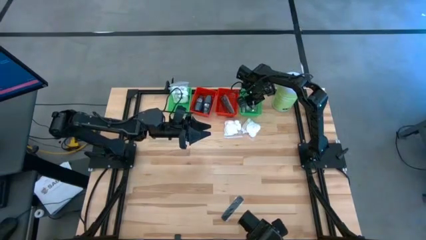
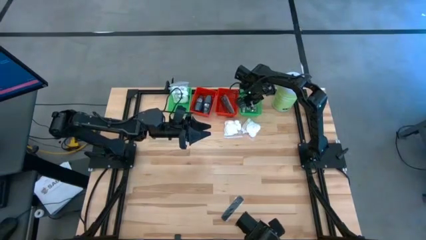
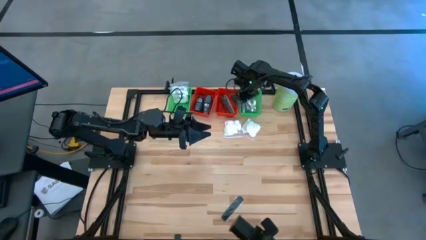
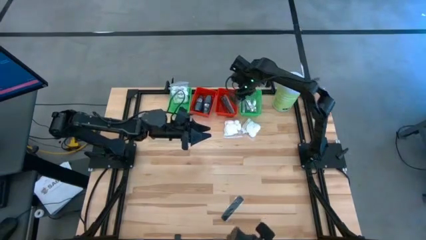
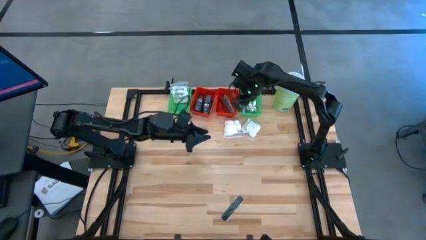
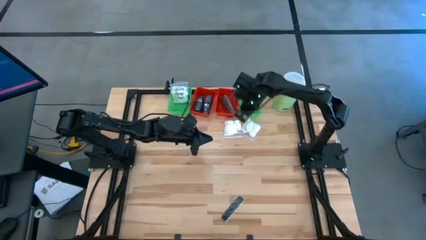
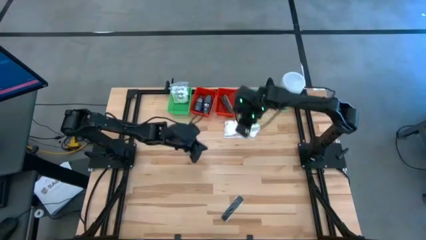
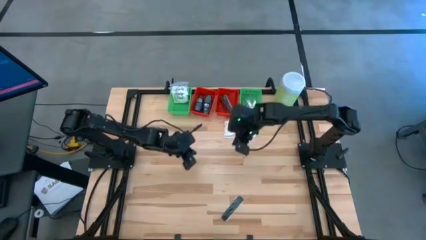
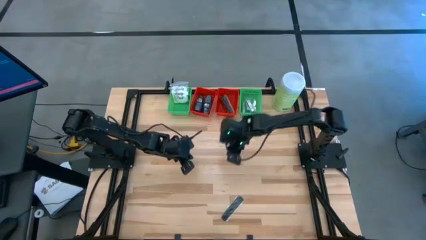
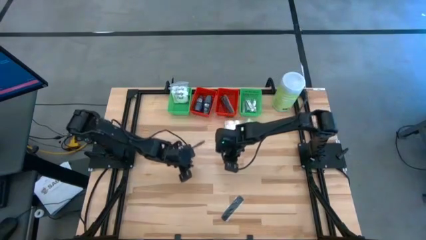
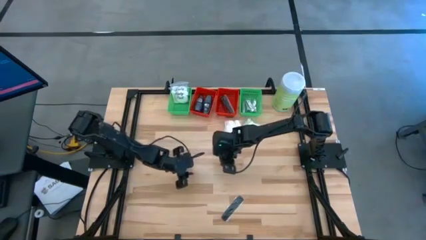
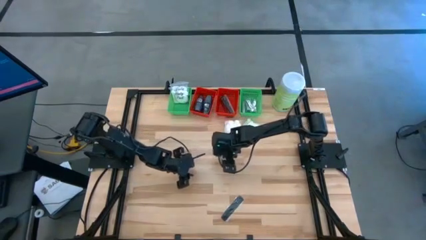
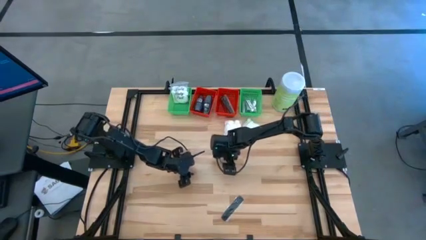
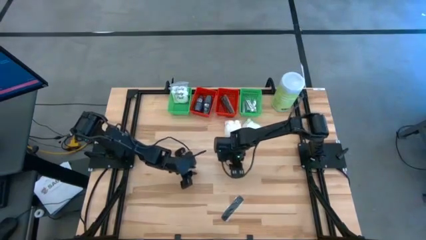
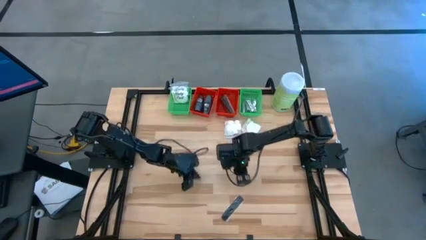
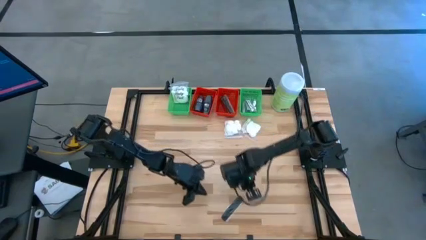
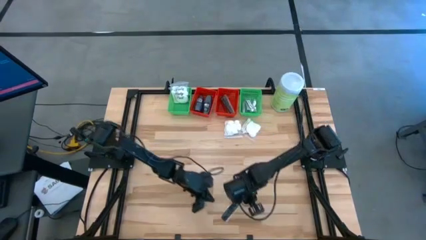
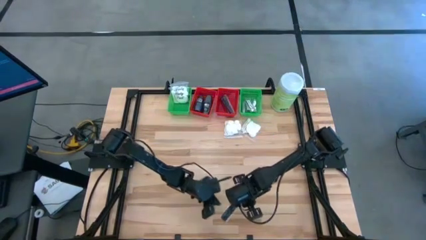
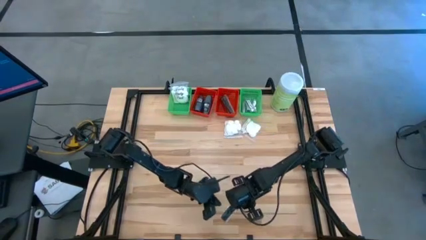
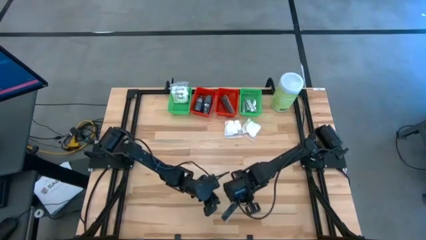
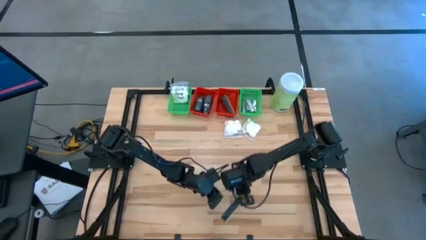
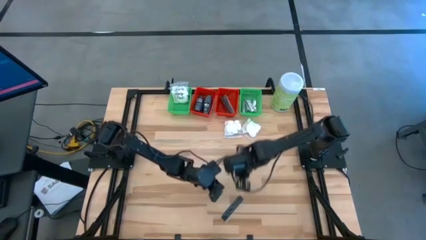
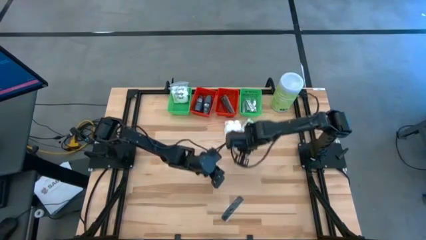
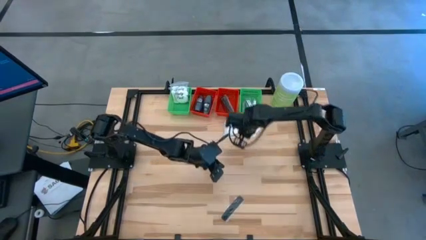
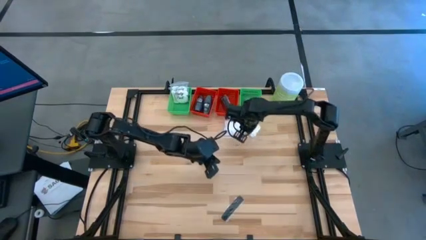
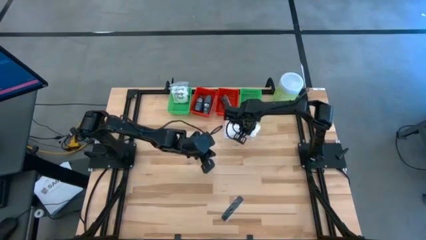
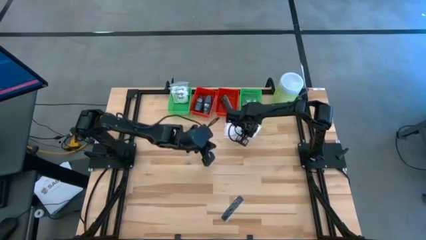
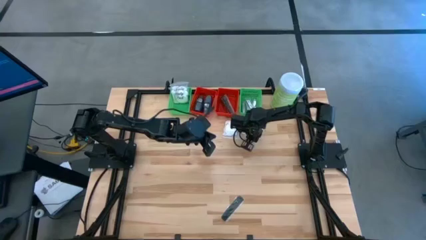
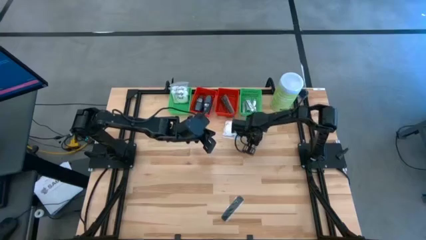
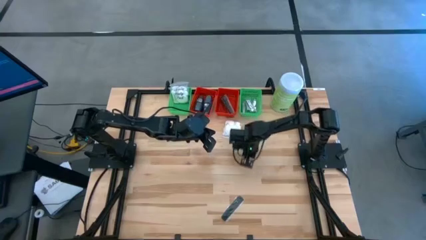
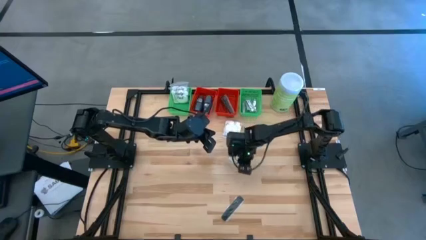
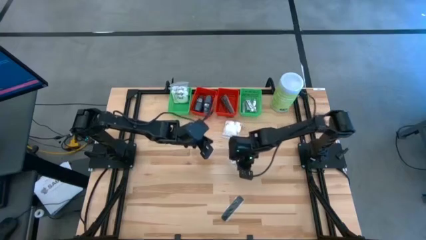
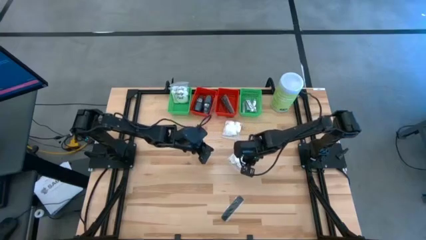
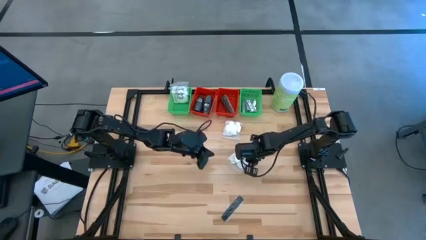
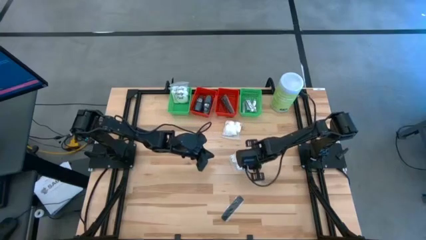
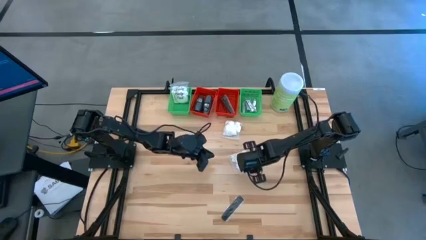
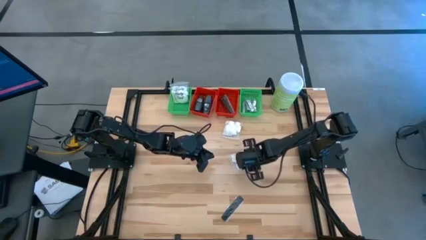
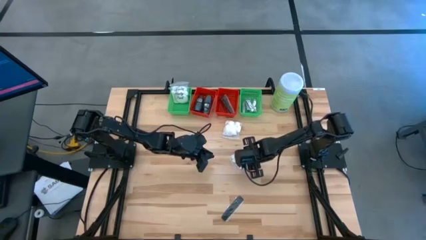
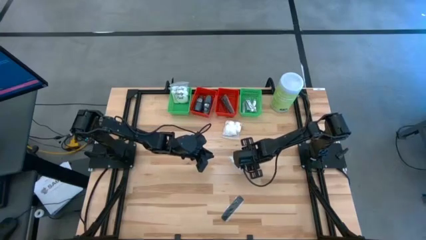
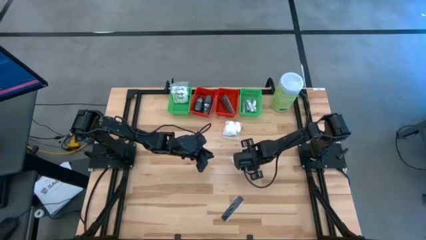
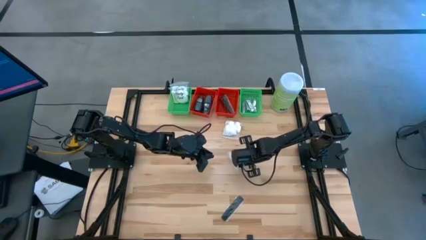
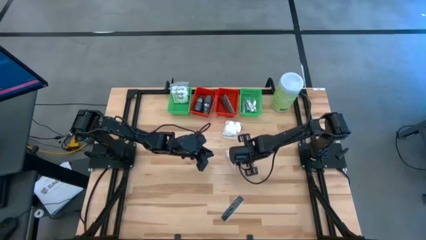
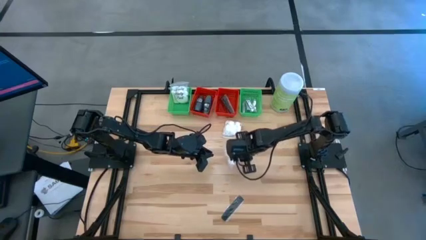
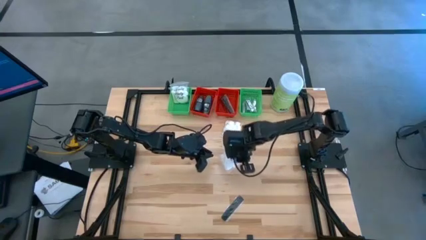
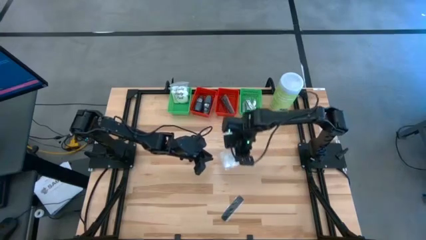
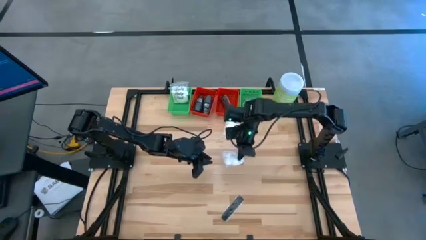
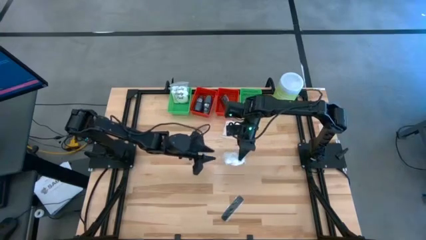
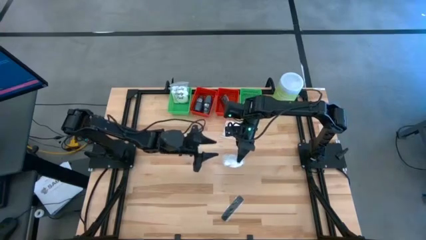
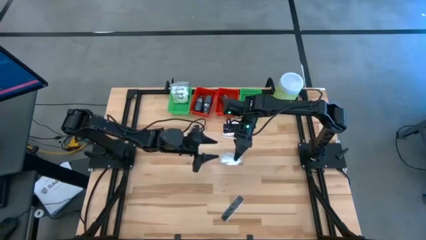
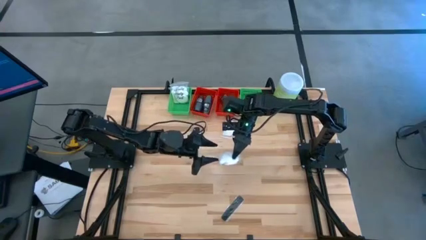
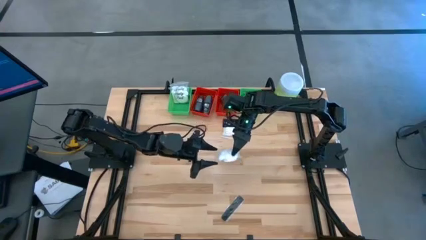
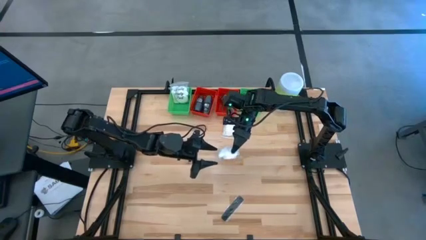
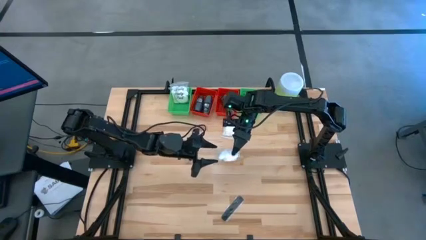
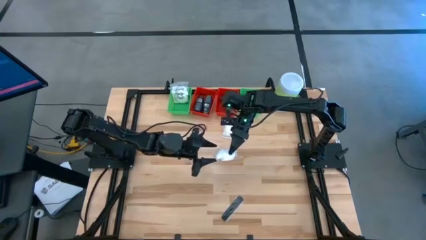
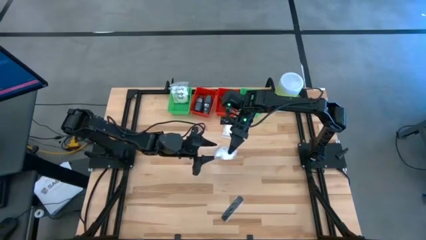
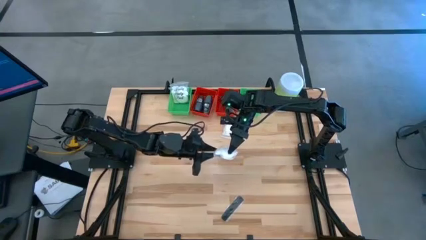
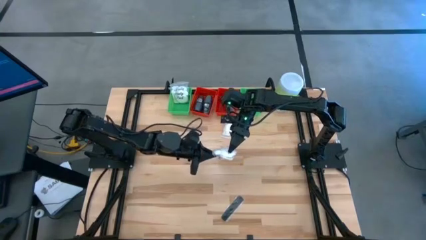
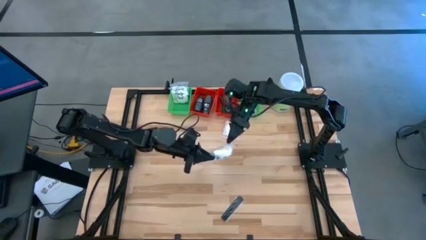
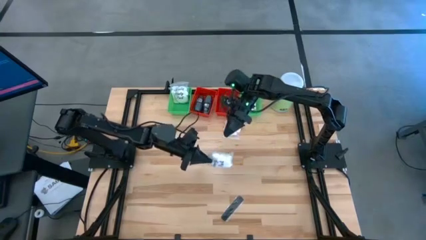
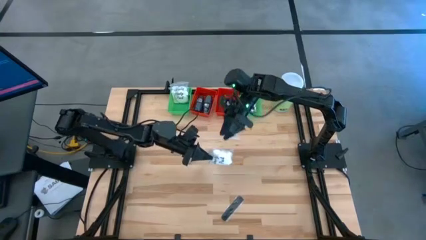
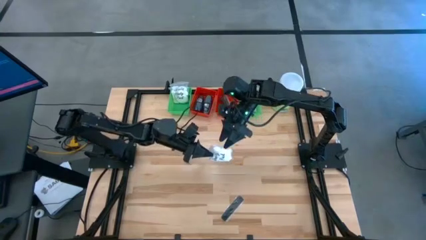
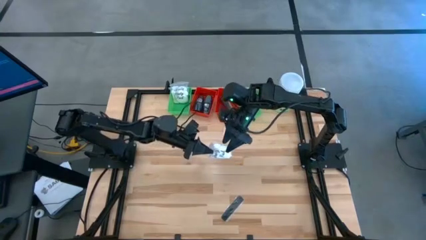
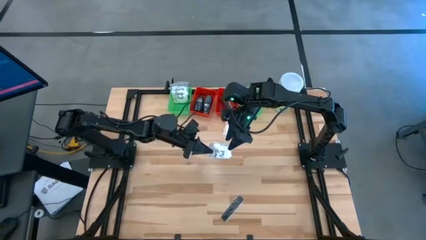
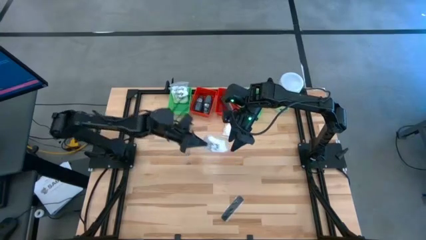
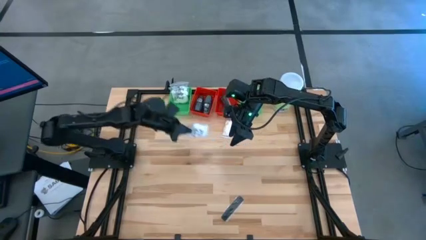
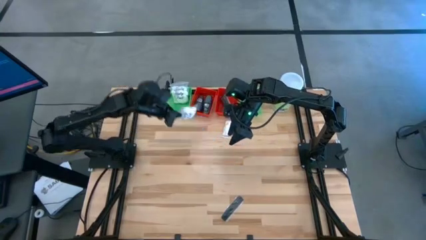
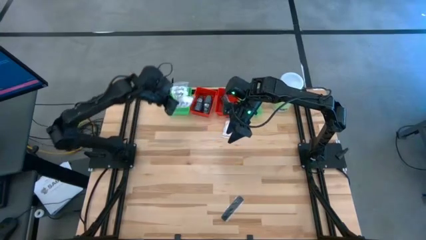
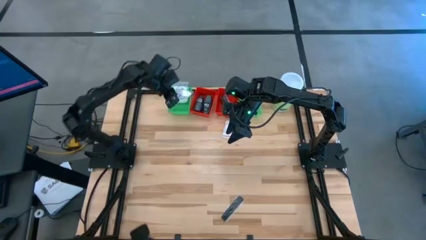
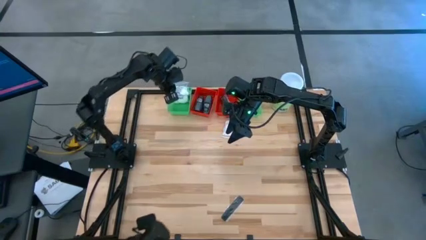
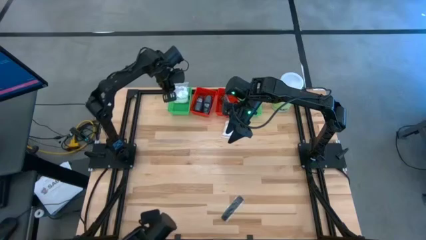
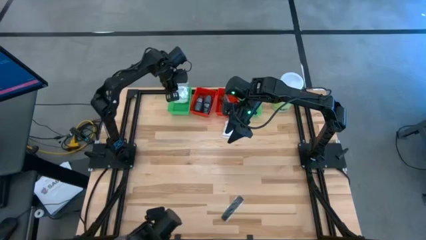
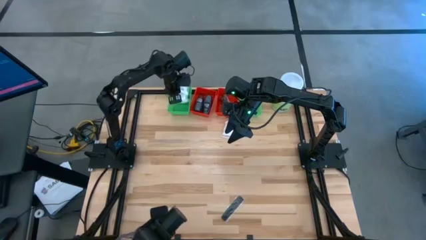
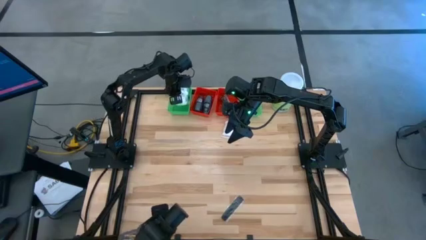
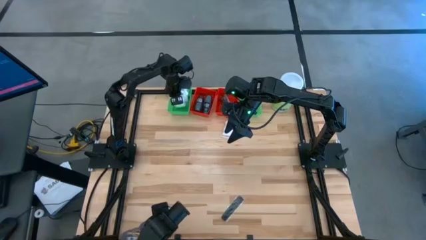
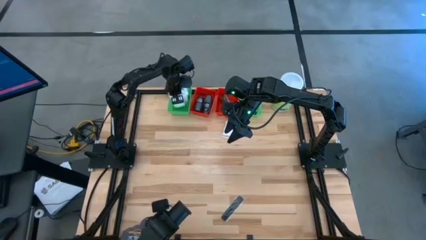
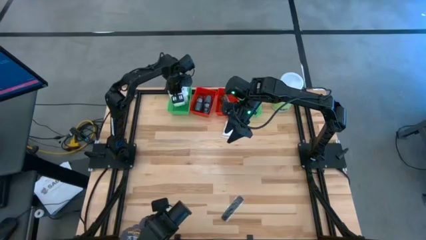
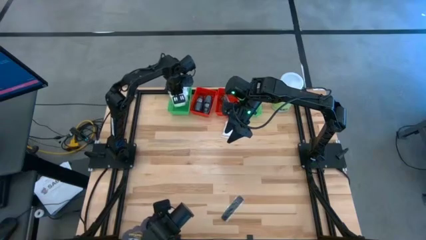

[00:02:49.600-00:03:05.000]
Task: Pick & Place Travel size toiletries
Put the cotton pack into the left green basket

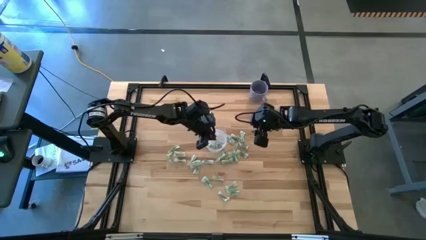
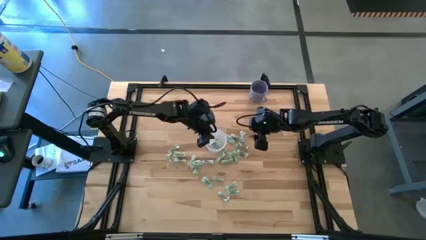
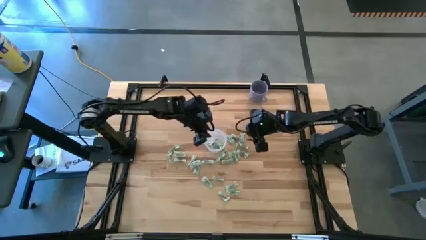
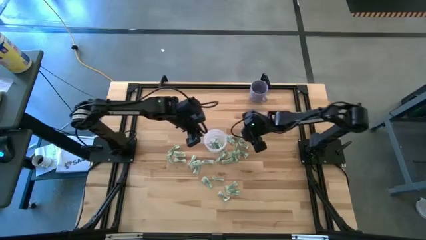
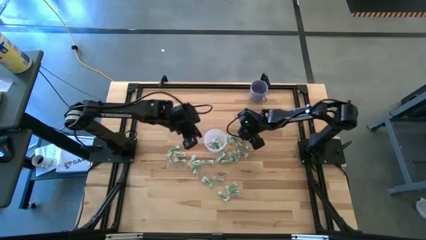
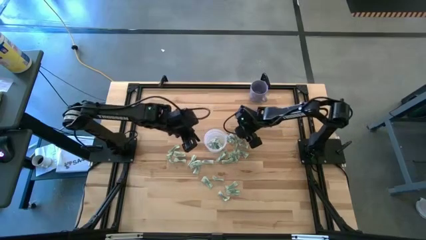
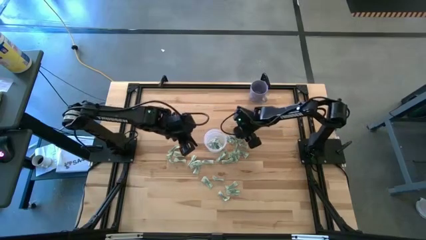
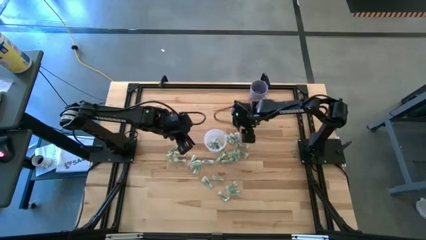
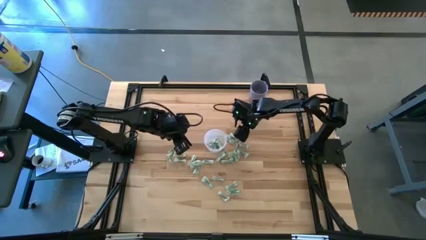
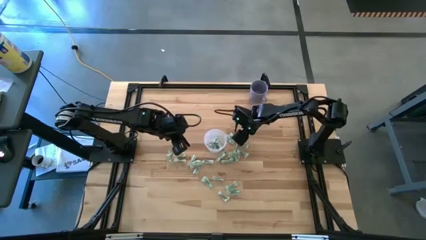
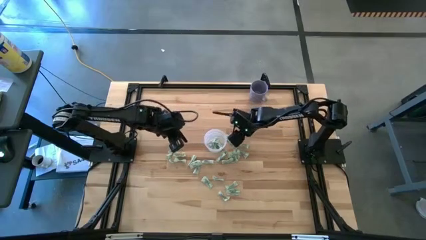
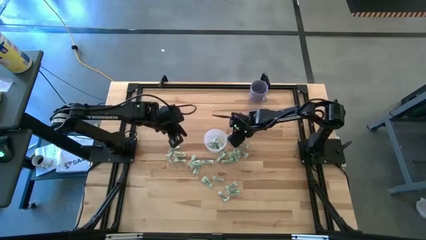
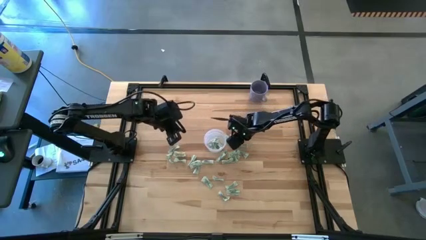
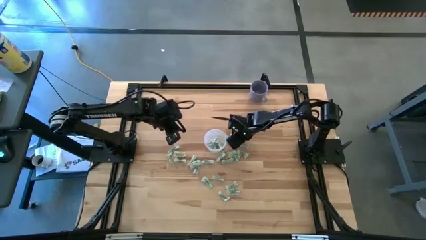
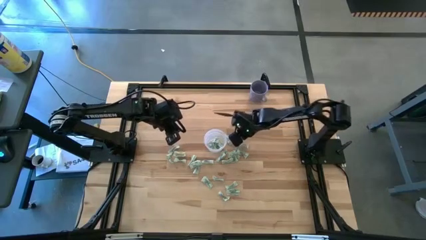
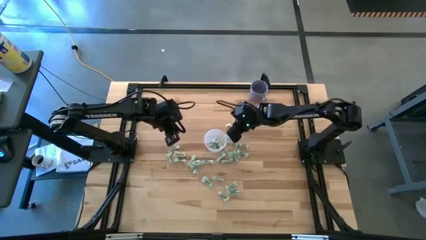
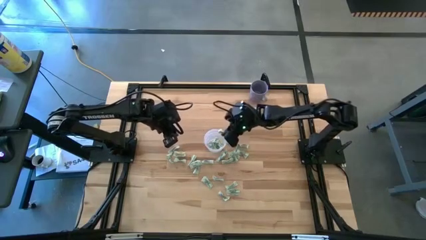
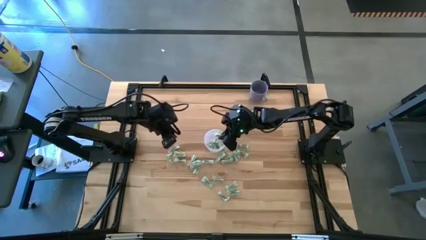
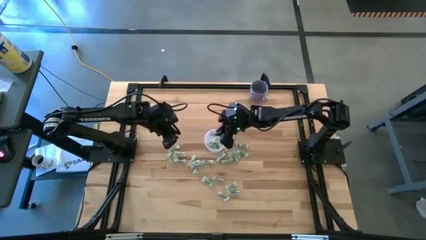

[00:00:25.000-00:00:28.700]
Task: Pick and place Stevia / Truvia into bins
Put the white stevia packet into the transparent container
